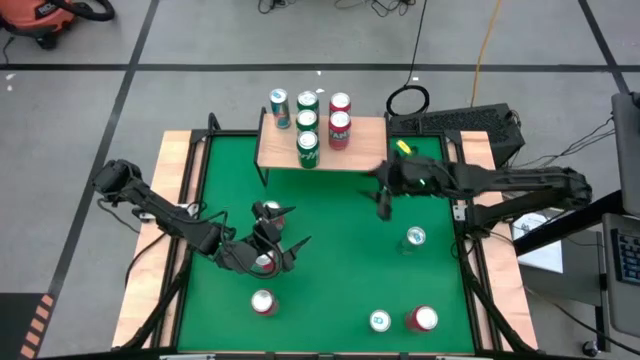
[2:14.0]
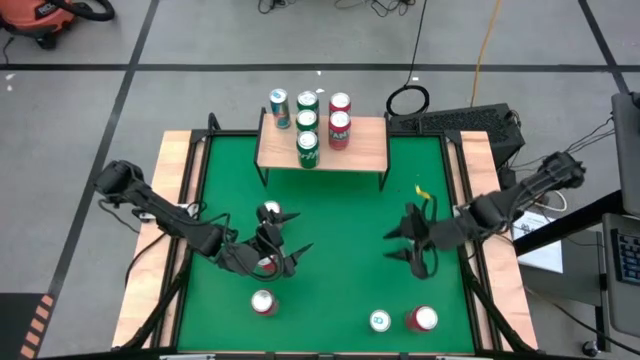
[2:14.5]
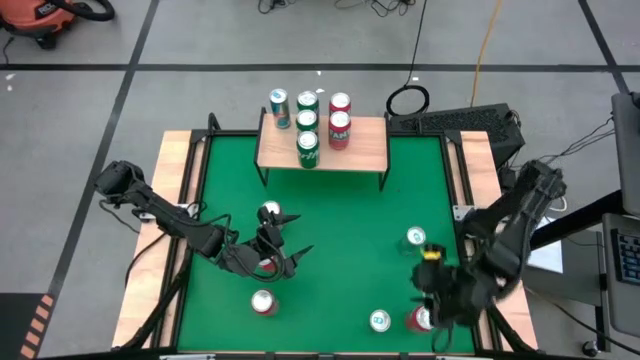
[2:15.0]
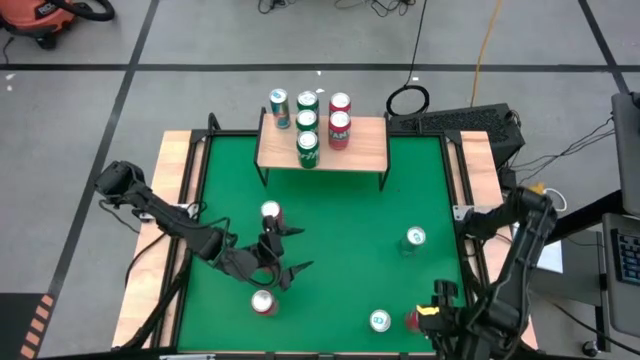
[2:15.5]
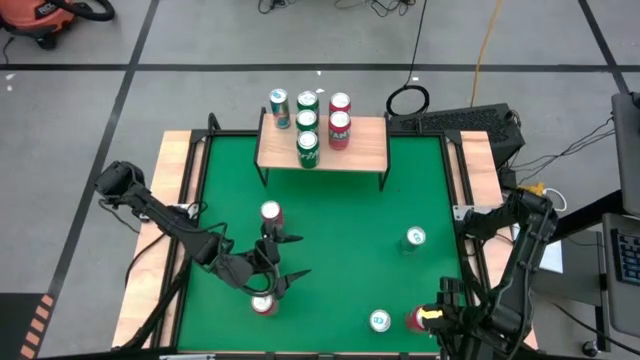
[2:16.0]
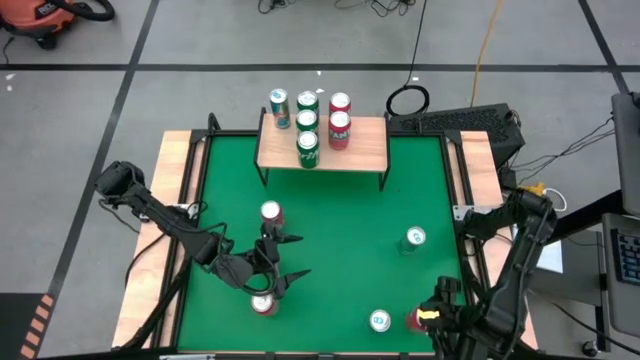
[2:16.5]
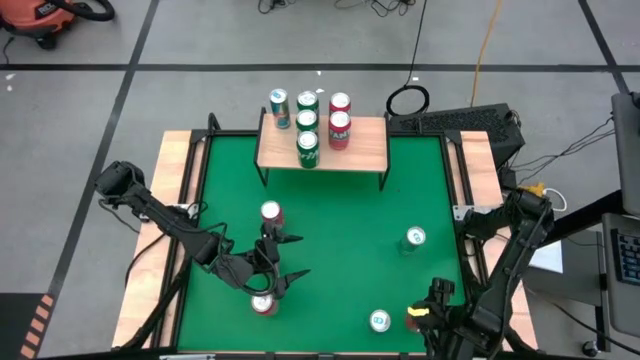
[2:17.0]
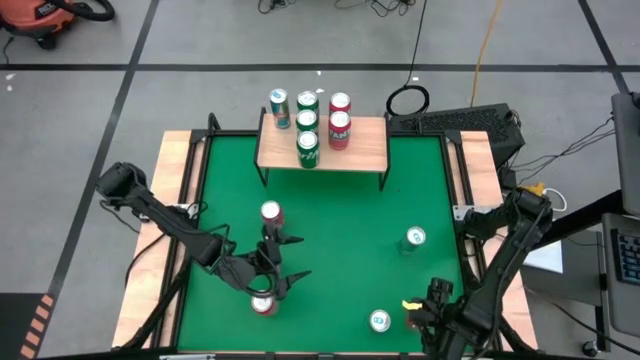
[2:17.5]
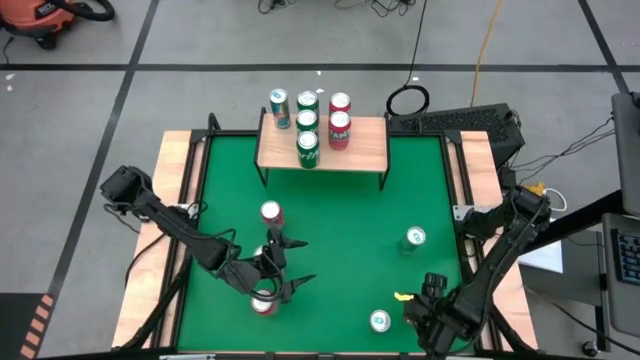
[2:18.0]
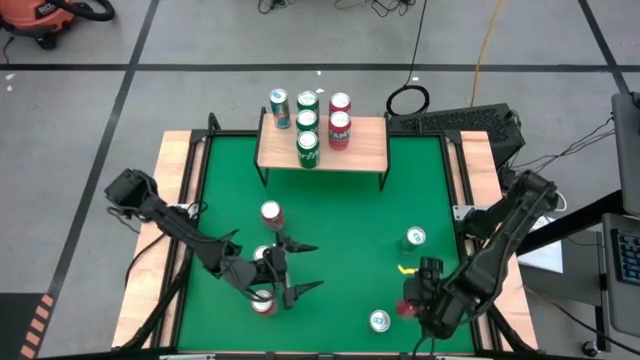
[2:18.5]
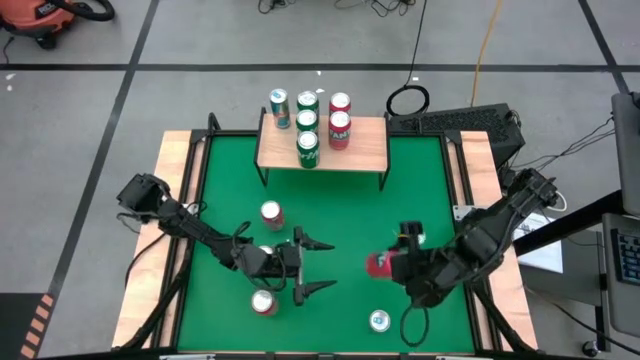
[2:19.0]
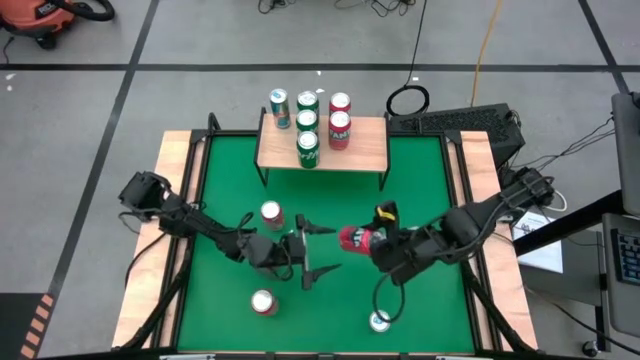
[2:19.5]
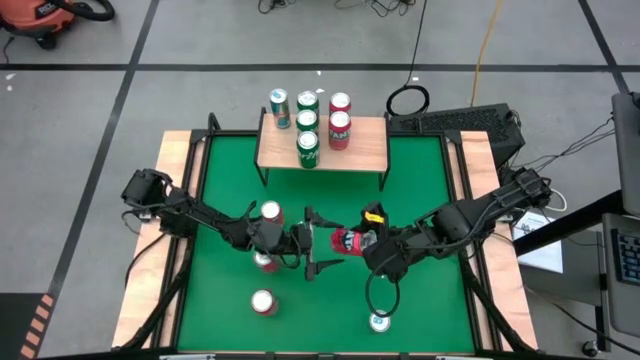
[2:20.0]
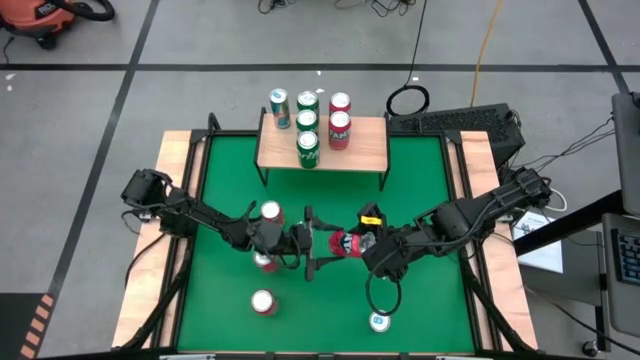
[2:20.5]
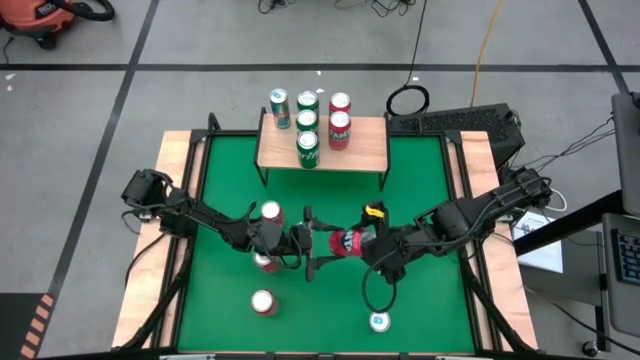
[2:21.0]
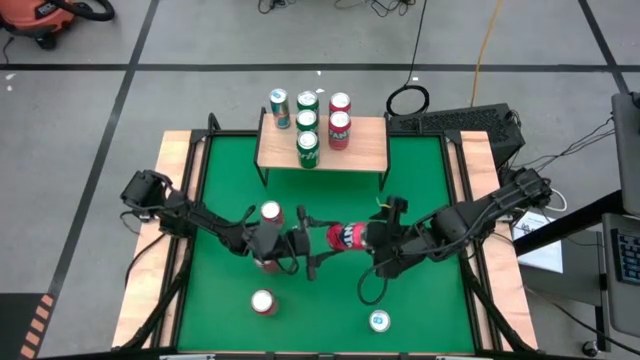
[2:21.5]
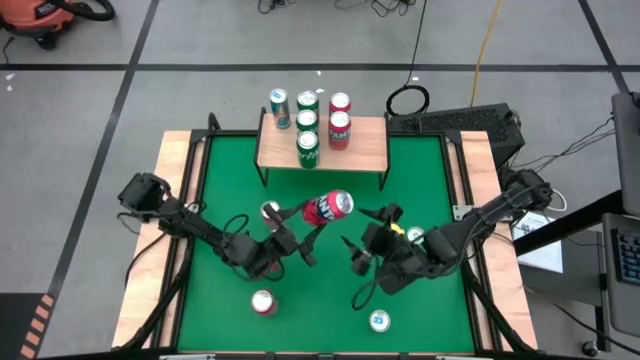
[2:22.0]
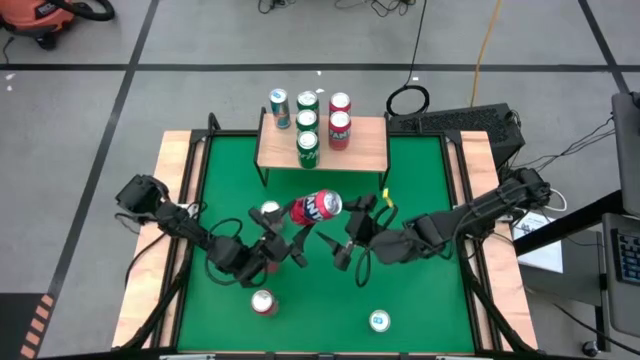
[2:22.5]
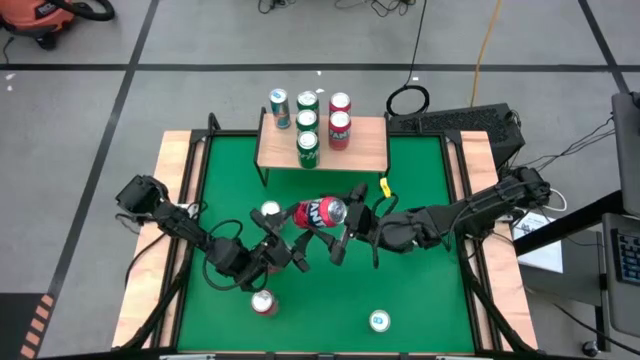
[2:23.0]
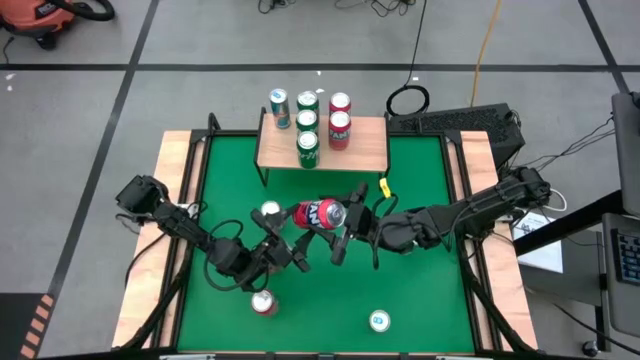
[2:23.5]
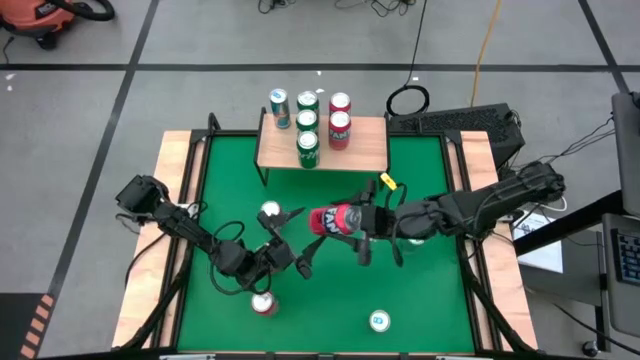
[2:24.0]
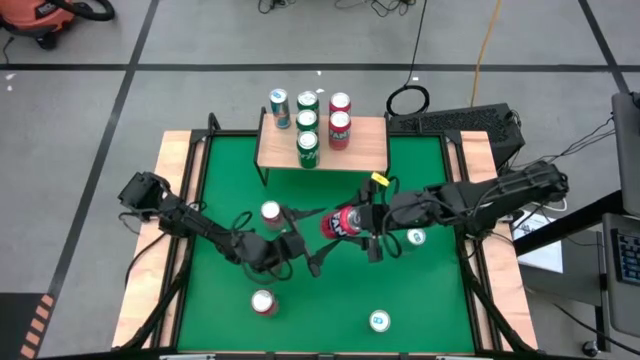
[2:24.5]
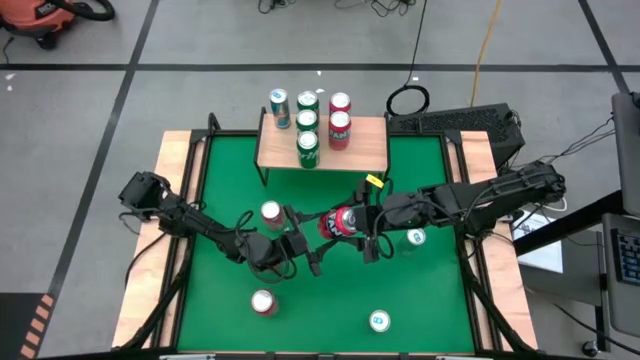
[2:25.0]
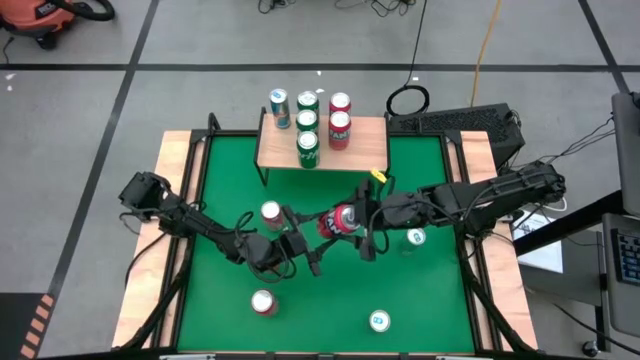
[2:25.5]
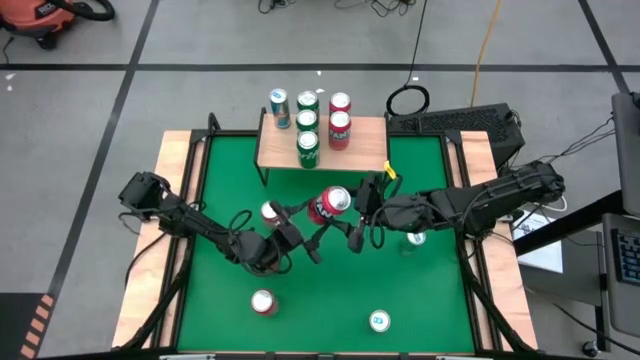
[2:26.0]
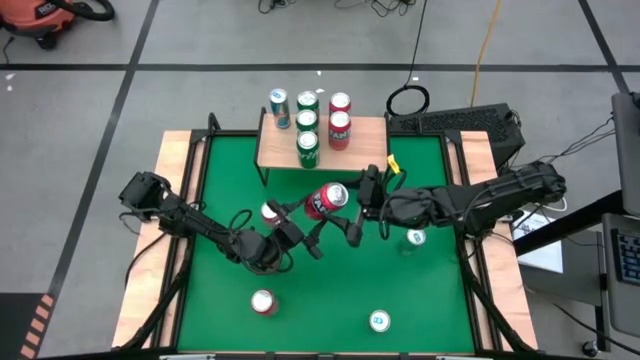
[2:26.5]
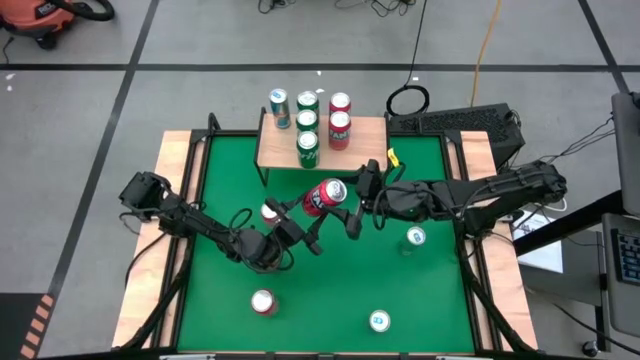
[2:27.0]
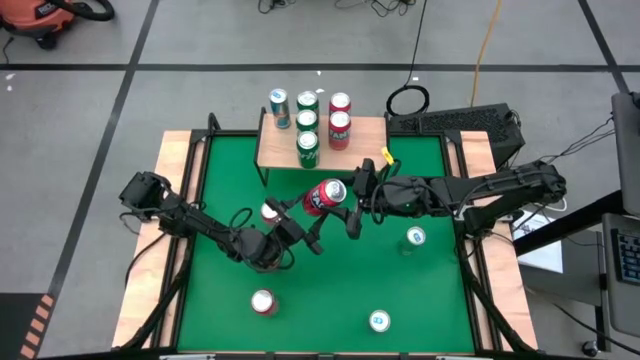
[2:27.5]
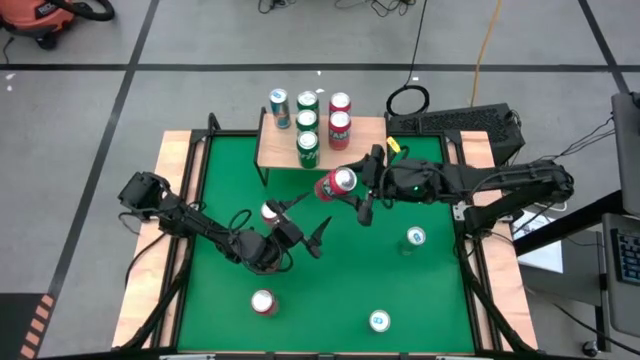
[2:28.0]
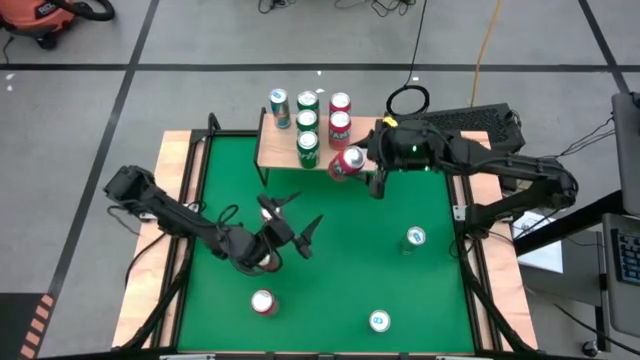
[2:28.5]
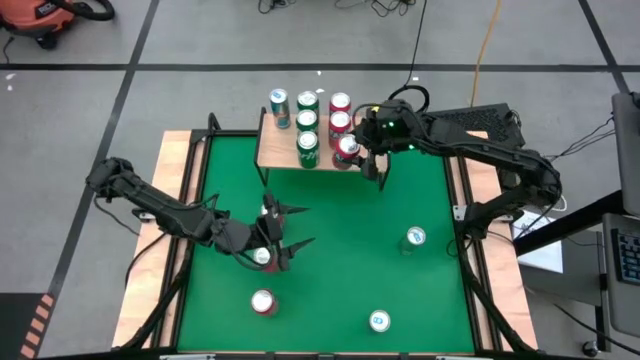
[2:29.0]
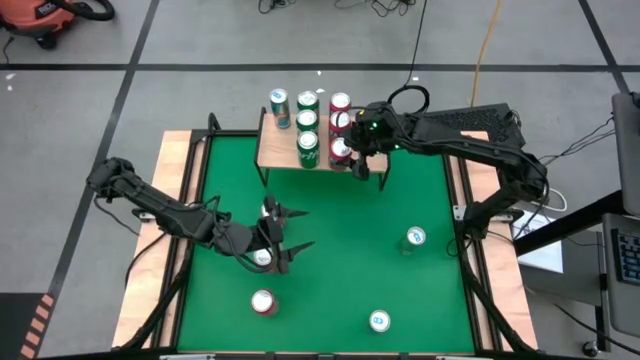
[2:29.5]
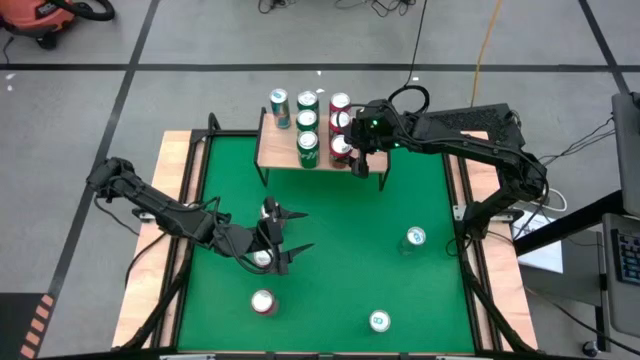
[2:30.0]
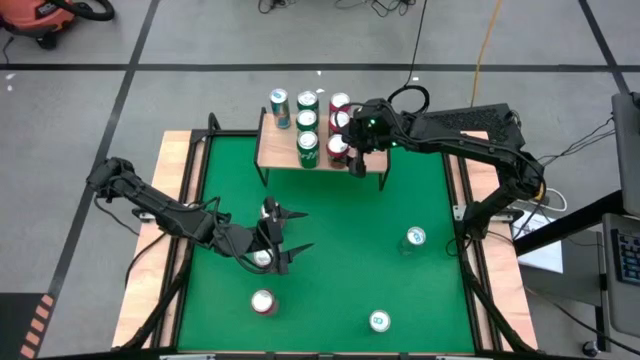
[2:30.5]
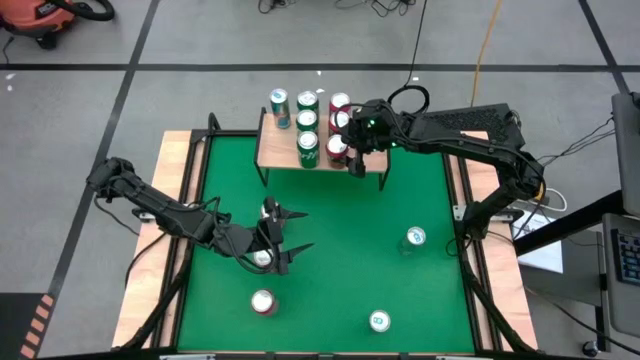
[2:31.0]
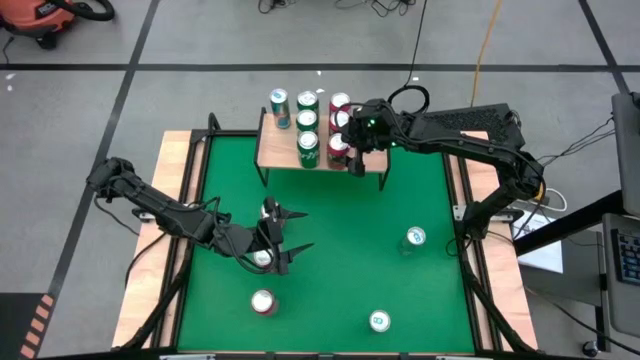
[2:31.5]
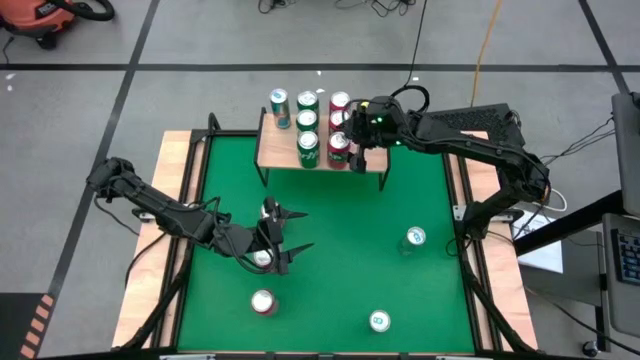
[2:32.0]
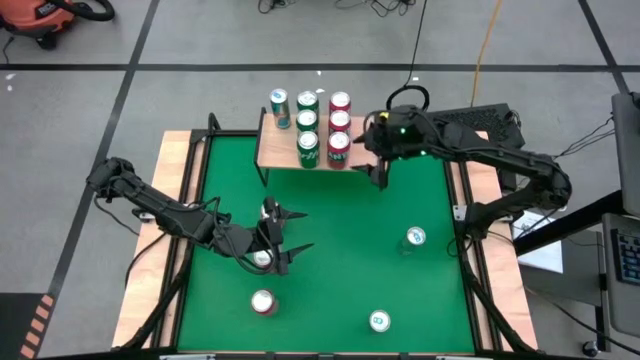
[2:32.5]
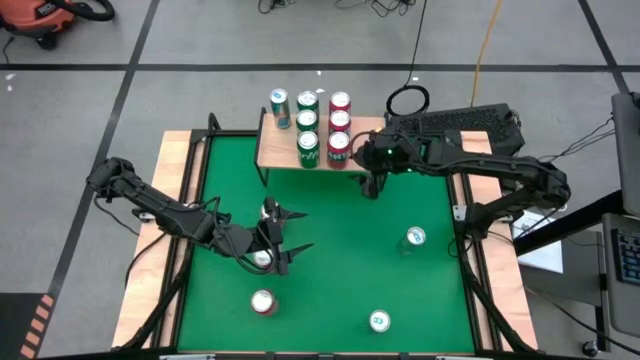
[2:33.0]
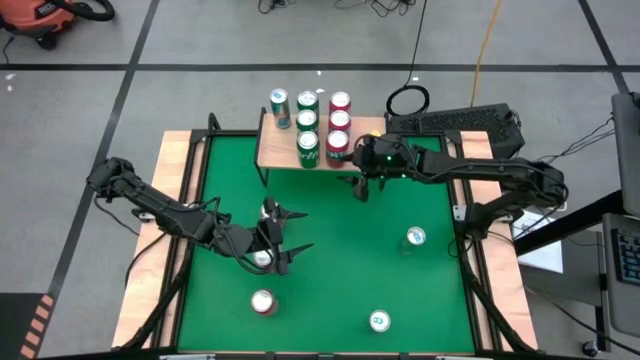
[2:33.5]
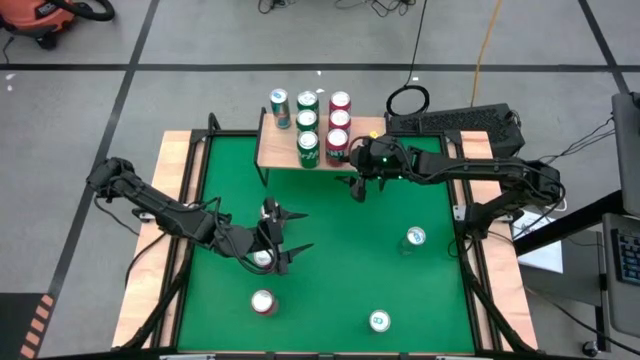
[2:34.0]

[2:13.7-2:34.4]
Task: Place canned beverage on shelf
Put the orange soda can on the shelf aligned with the other orange soda can

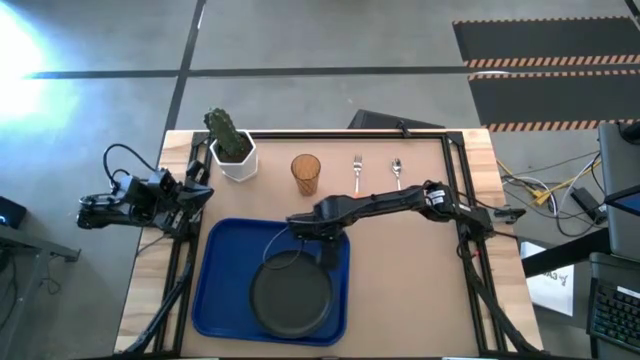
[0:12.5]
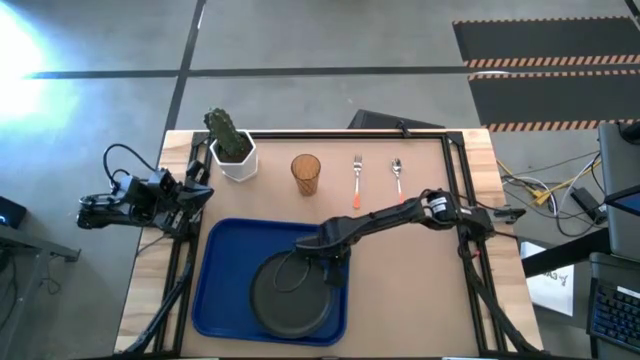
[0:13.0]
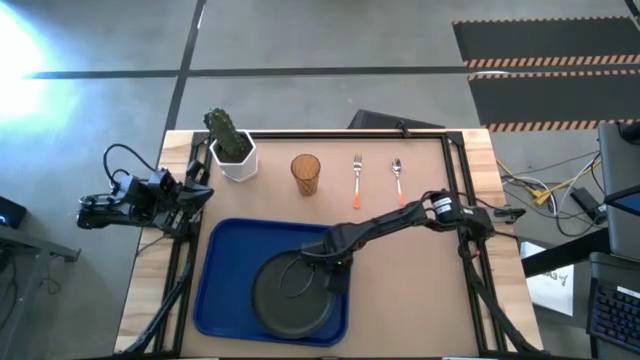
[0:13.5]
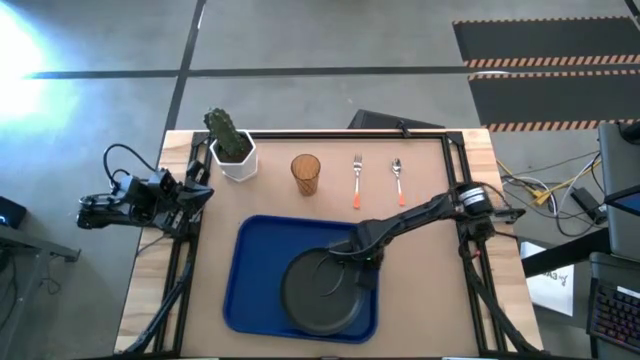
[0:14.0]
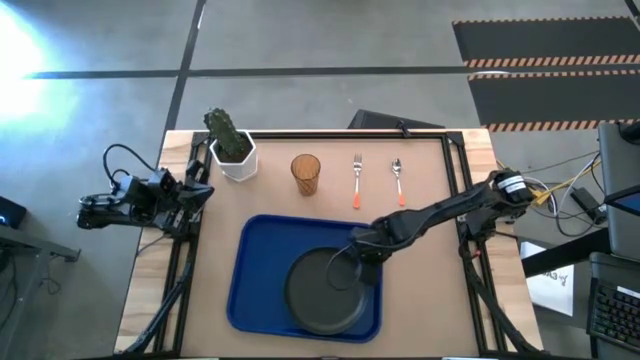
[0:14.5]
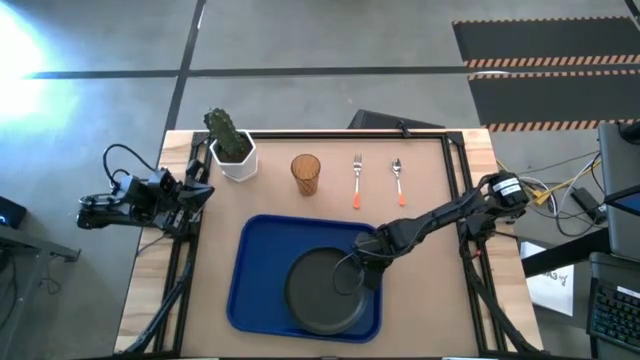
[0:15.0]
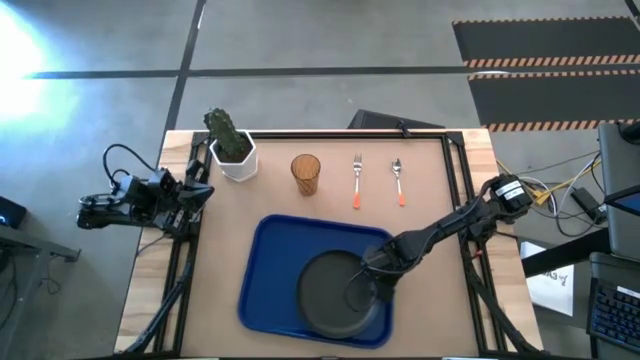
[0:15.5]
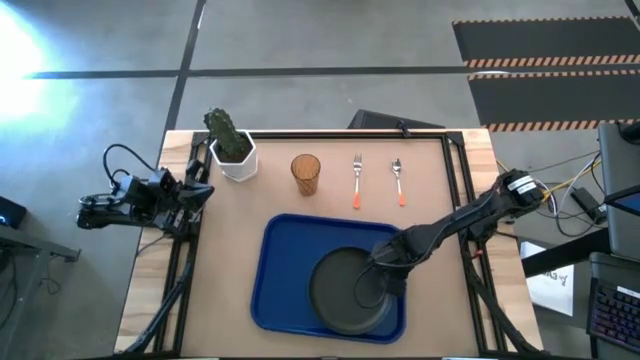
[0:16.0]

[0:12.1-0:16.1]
Task: Pick and place plate/cup/fork/spoon on tray
Adjust the blue serving tray
